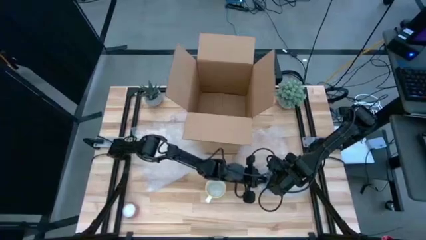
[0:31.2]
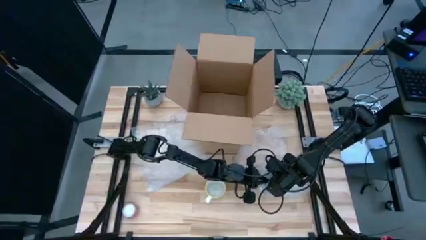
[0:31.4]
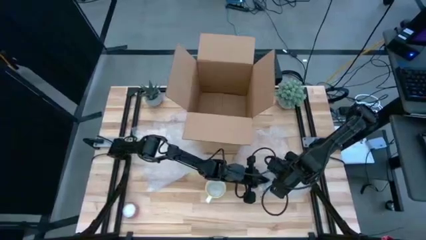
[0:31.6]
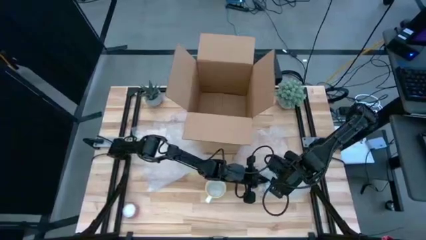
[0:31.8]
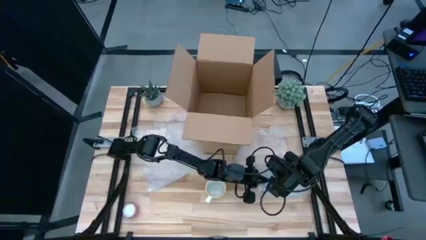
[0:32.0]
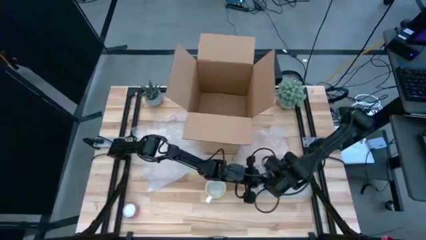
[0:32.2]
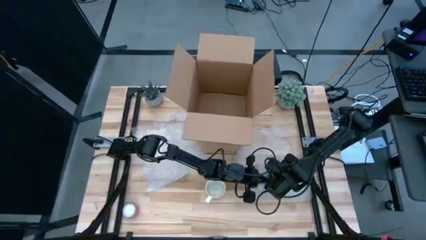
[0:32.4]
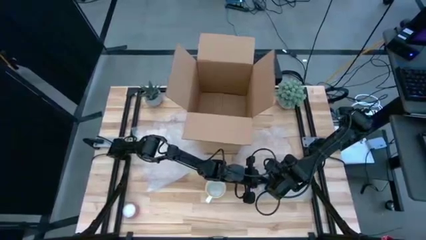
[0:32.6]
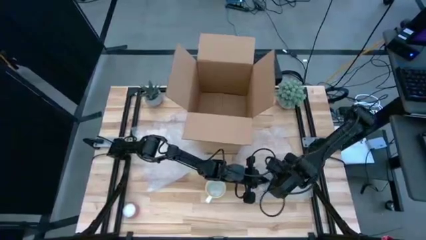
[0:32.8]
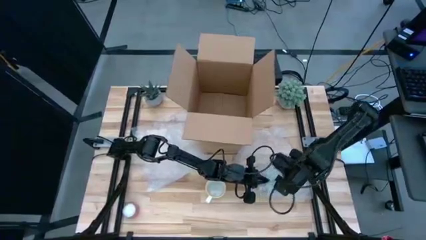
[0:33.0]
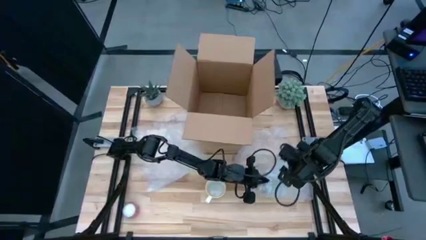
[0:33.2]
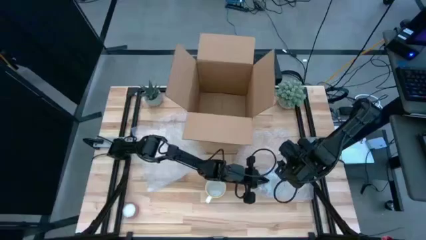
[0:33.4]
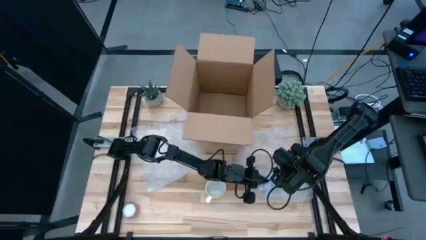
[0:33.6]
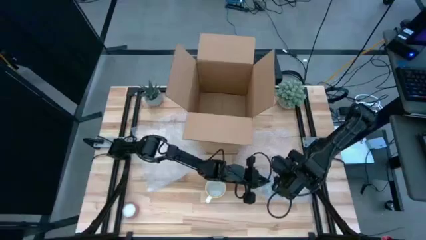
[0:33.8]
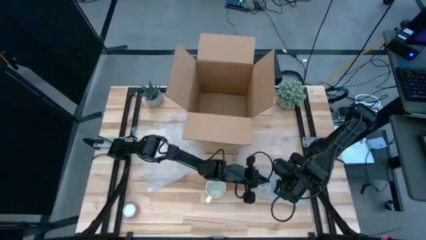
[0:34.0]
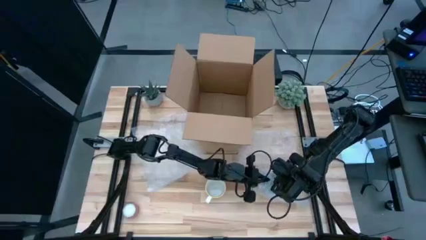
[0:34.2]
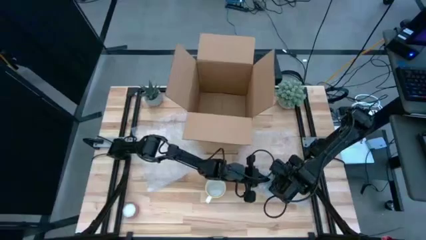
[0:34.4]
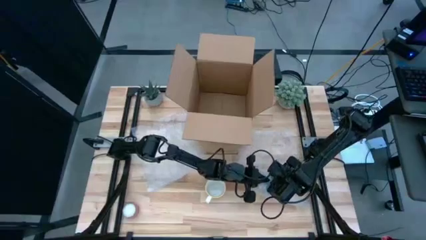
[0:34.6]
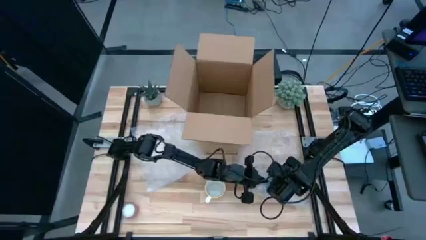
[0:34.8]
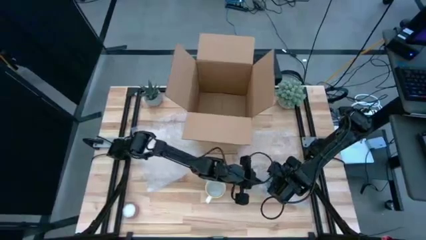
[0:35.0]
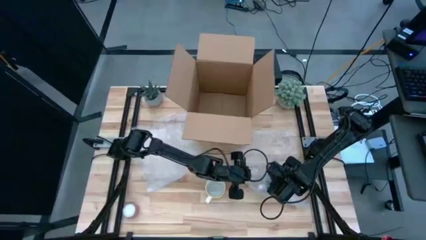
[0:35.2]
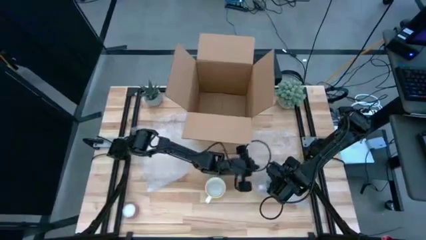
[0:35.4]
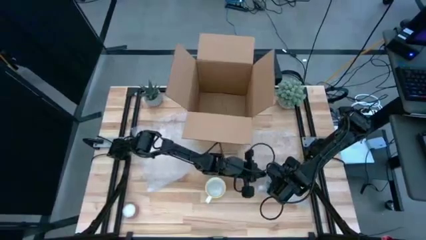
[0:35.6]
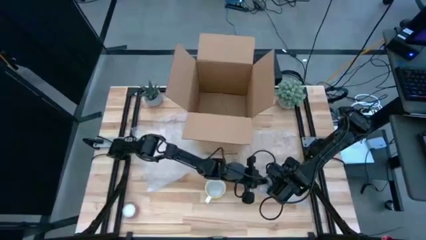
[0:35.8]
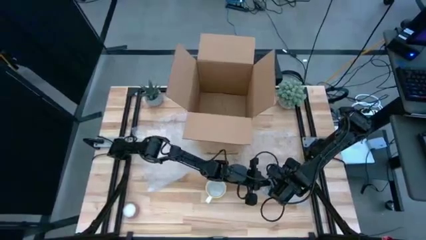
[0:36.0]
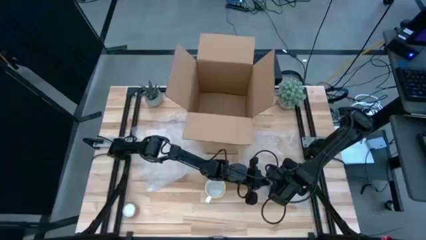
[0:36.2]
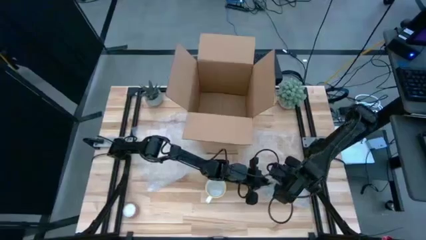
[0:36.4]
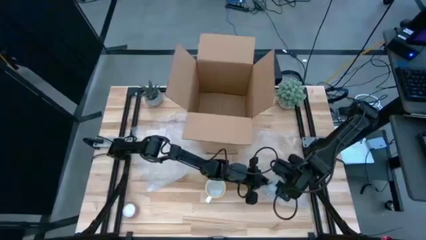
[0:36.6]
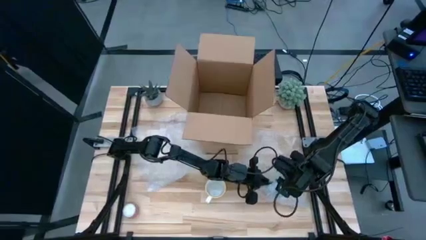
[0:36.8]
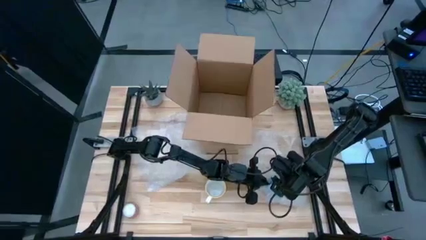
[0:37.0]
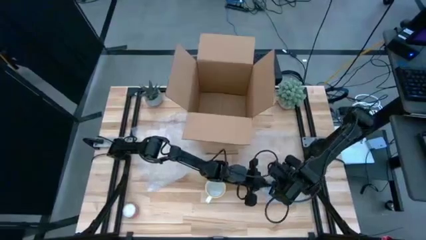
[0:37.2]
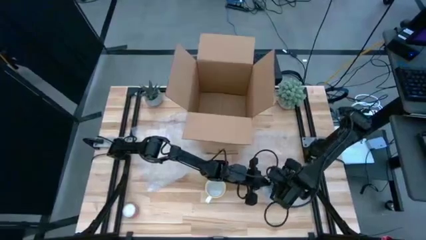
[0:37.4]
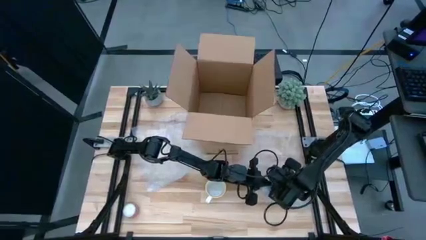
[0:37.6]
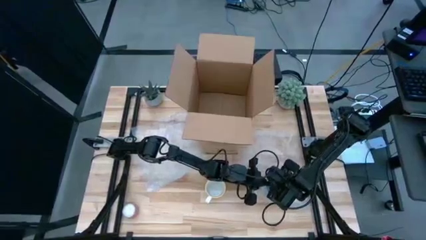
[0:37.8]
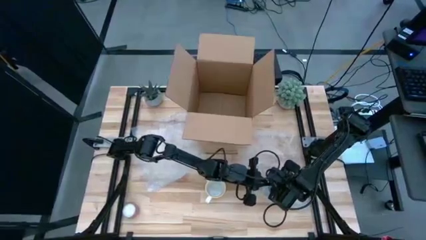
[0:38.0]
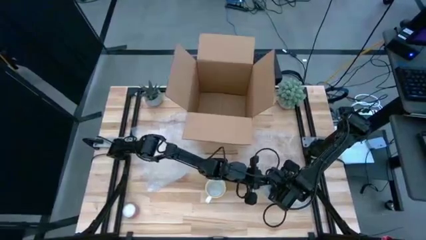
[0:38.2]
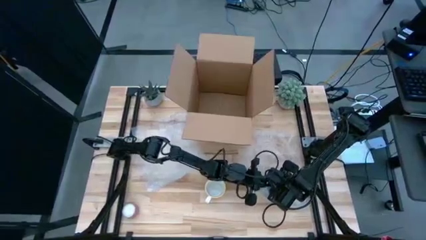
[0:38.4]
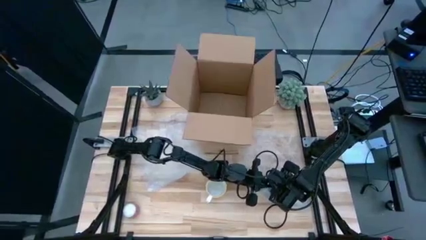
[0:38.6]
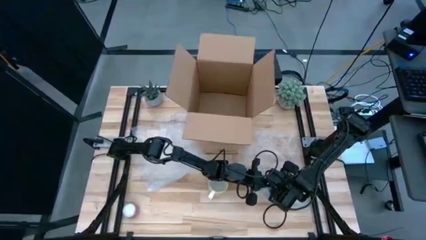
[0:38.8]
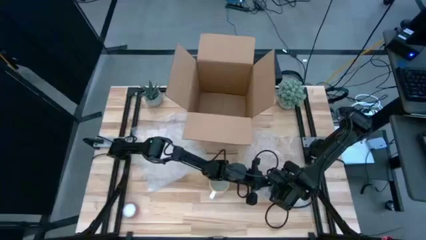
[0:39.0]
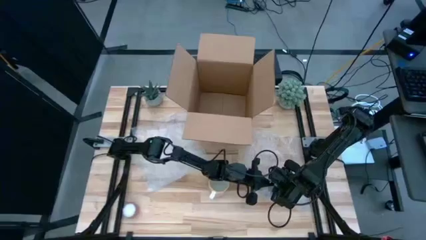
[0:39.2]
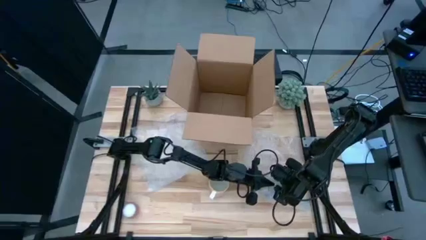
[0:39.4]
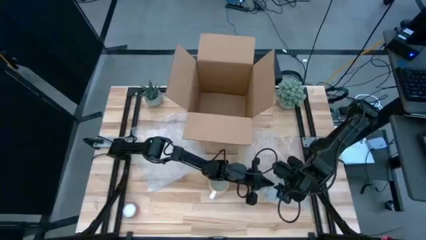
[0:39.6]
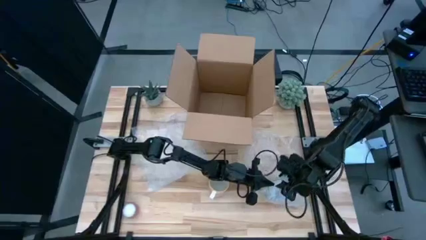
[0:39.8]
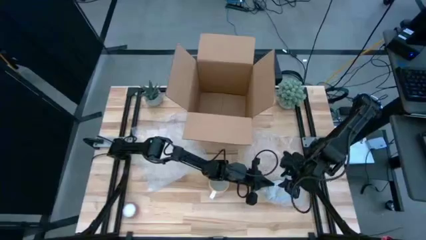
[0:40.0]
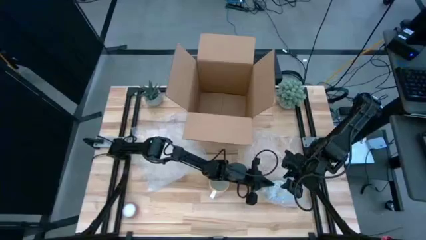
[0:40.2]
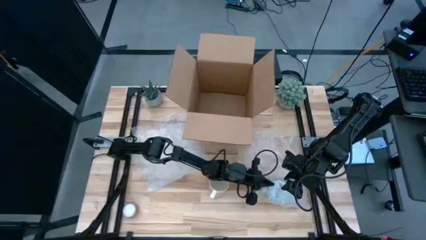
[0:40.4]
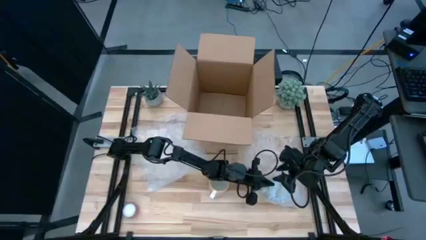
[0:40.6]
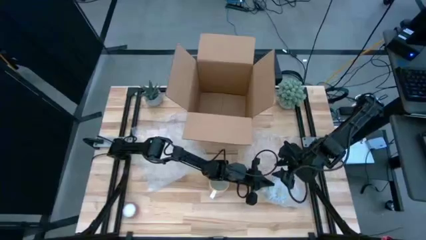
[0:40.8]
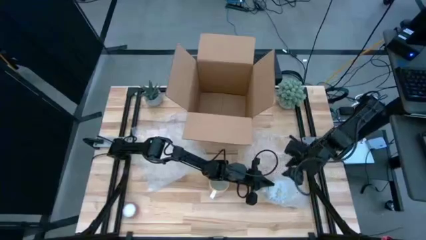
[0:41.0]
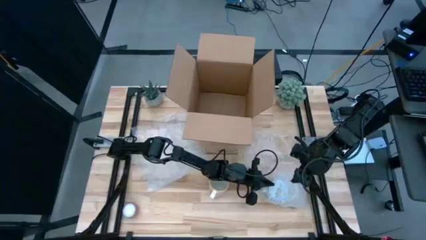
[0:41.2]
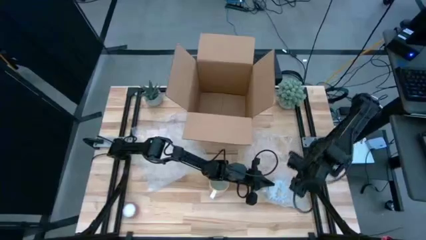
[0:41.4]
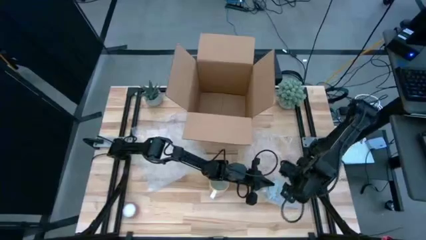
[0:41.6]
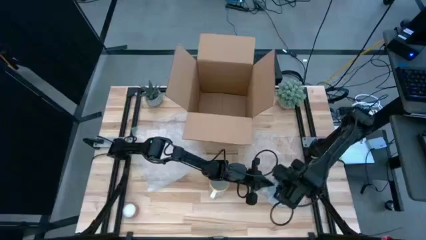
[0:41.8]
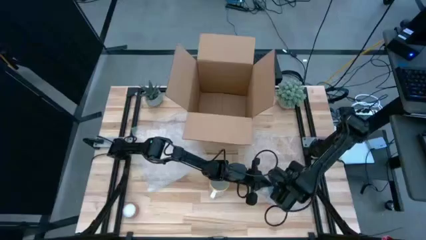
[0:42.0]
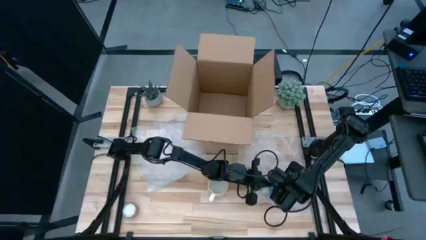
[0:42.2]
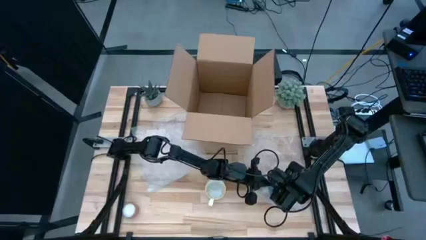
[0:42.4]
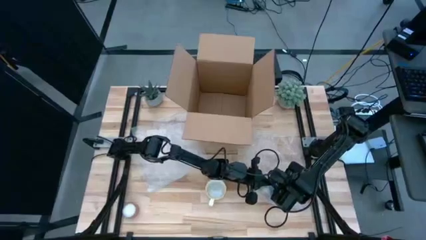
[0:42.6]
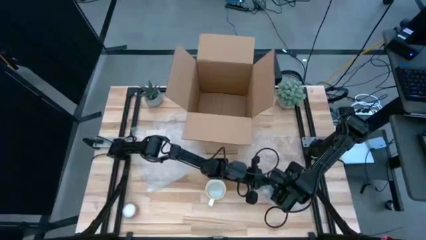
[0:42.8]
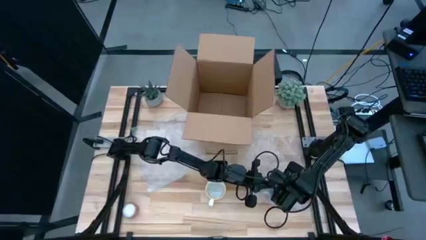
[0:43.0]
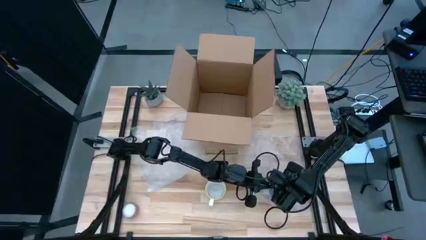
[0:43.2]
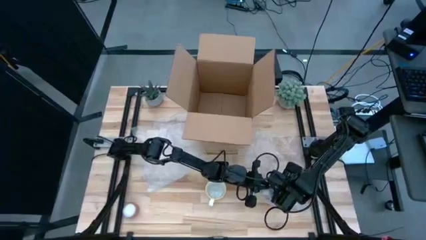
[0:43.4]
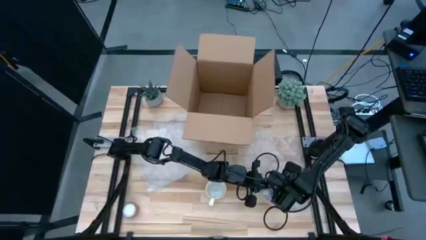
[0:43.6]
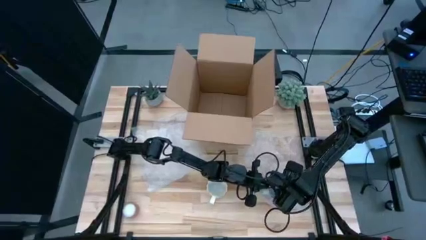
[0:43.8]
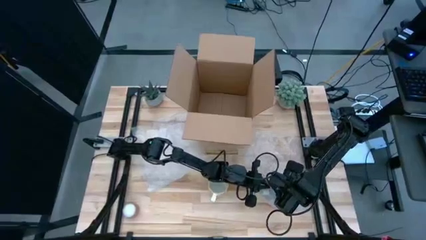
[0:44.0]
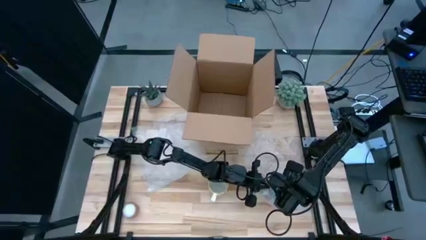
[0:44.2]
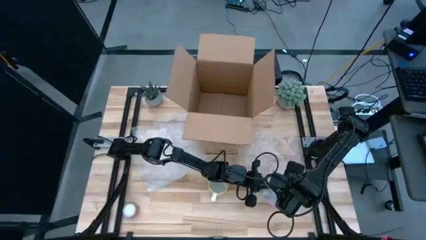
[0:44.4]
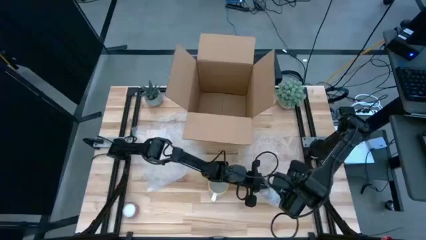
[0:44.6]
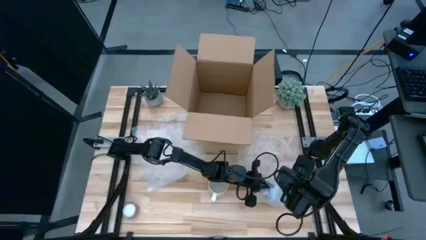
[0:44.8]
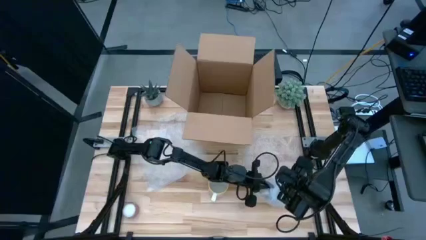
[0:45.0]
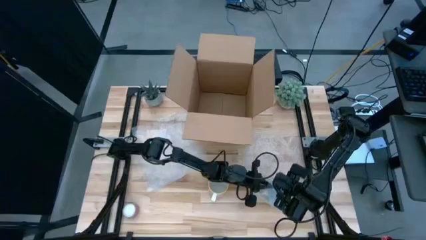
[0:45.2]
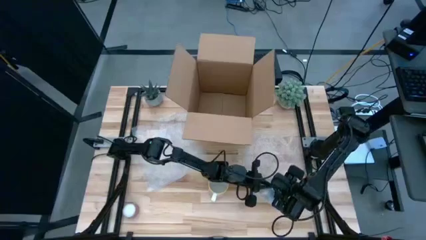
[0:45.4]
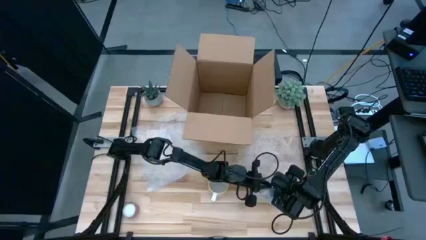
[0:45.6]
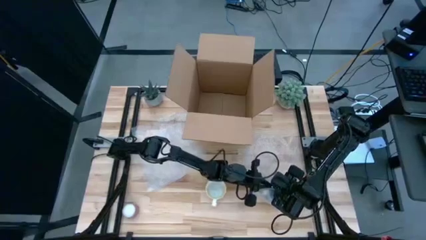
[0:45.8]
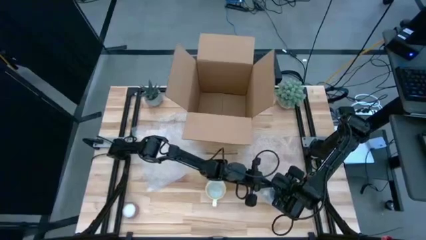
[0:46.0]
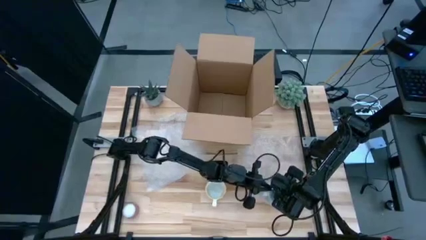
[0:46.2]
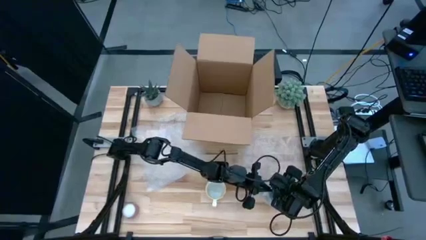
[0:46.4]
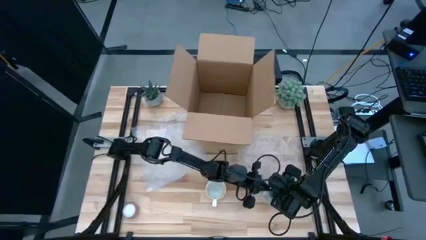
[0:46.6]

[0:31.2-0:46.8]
Task: wrap mug
Wrap the red cup with the bubble wrap

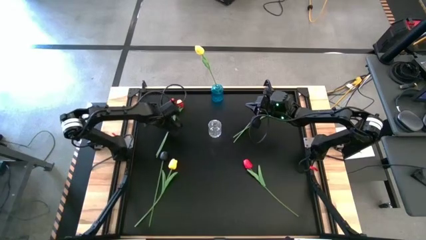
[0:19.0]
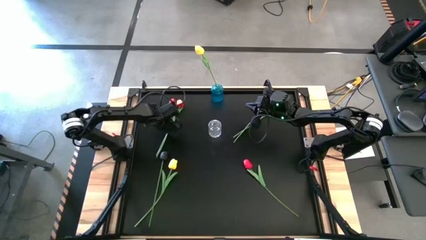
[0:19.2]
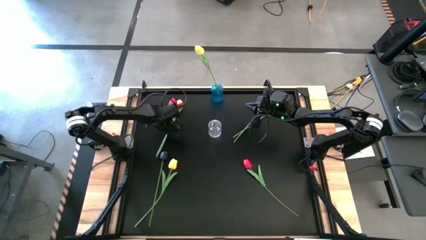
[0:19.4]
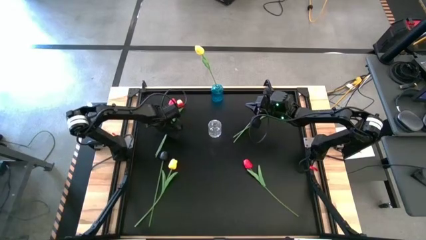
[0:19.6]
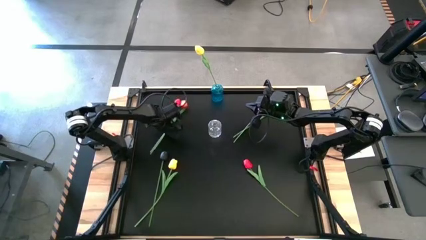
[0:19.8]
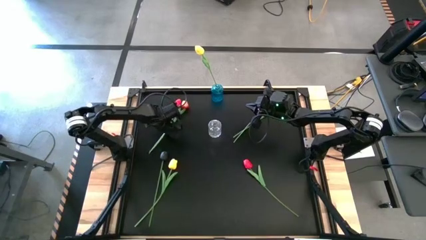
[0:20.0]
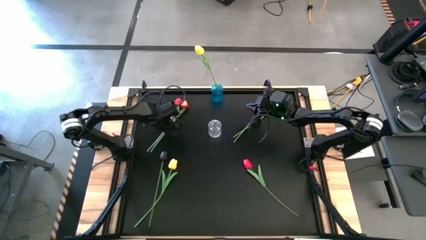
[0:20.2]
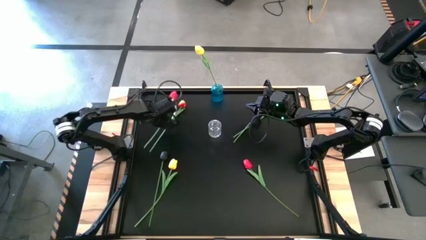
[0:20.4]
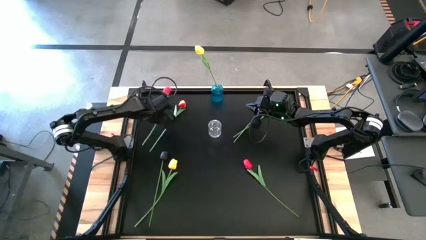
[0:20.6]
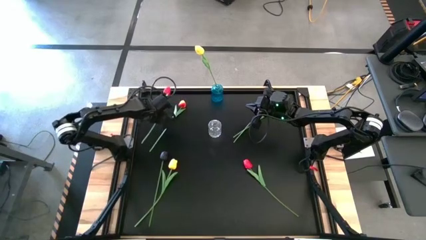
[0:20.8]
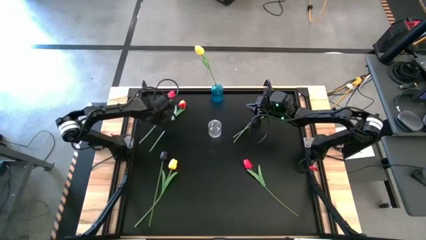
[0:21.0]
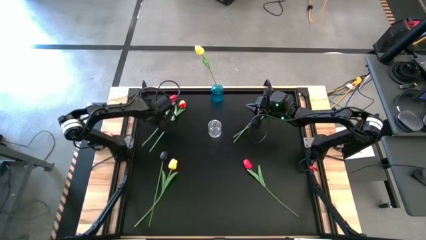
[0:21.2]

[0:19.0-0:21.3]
Task: Sort flowers into vase by color
Adjust the top red tulip
